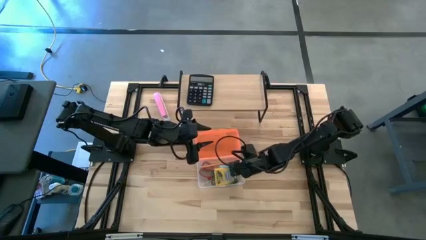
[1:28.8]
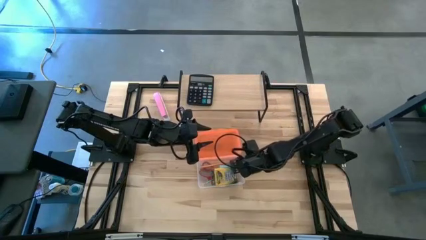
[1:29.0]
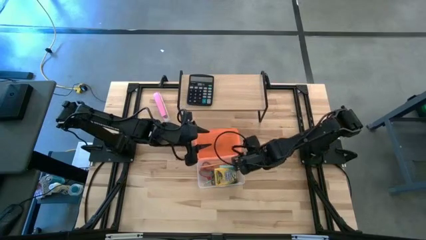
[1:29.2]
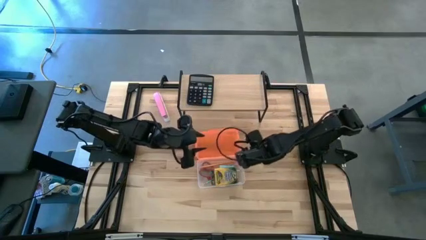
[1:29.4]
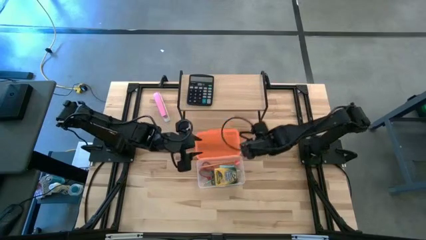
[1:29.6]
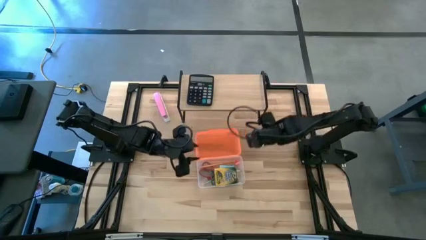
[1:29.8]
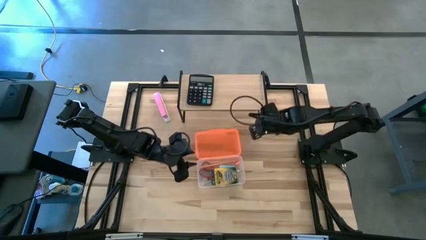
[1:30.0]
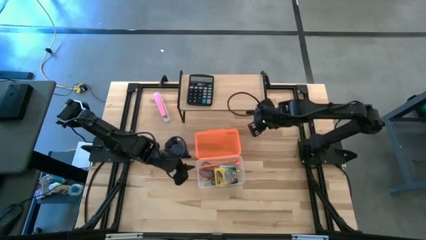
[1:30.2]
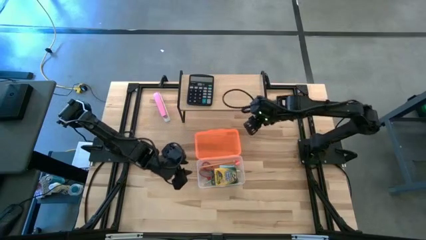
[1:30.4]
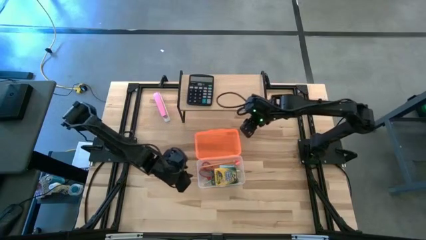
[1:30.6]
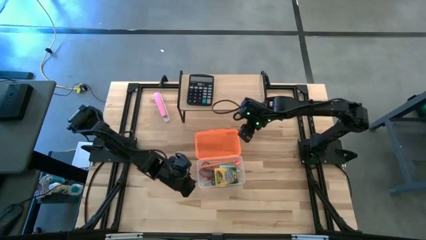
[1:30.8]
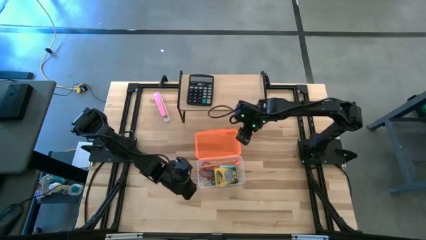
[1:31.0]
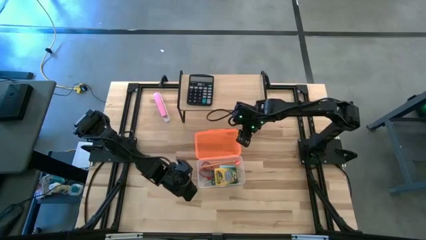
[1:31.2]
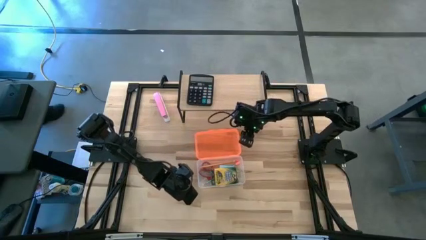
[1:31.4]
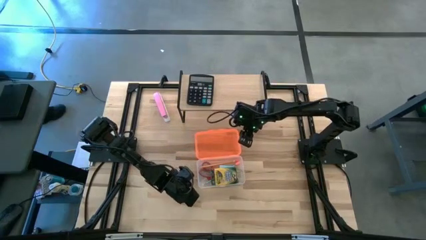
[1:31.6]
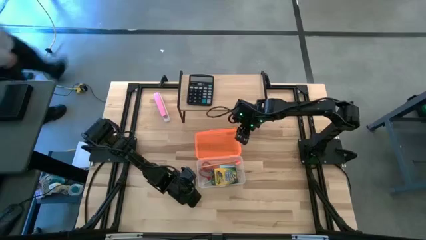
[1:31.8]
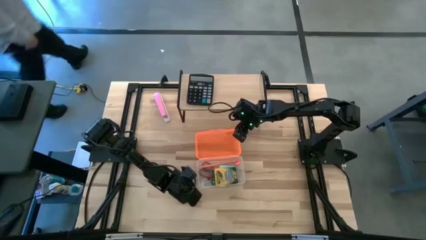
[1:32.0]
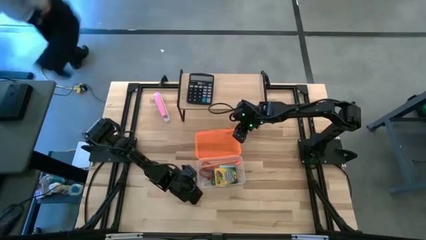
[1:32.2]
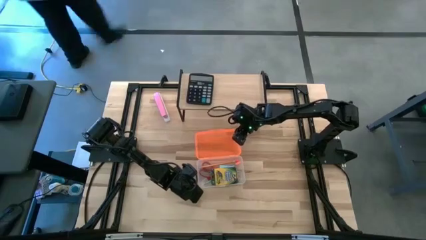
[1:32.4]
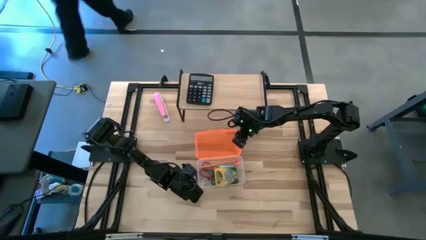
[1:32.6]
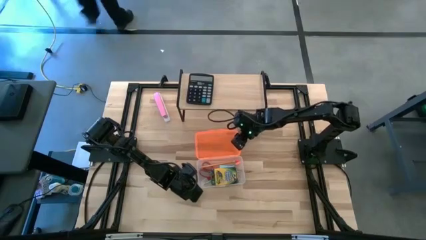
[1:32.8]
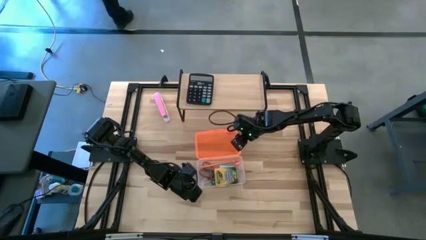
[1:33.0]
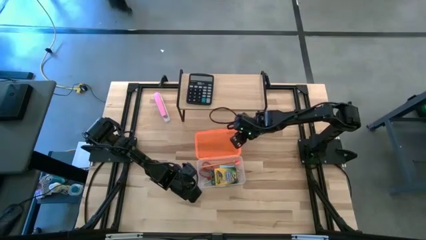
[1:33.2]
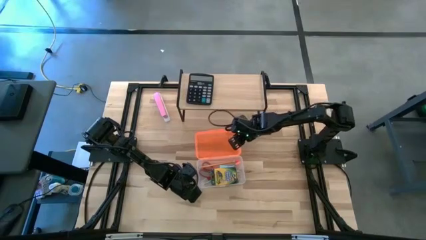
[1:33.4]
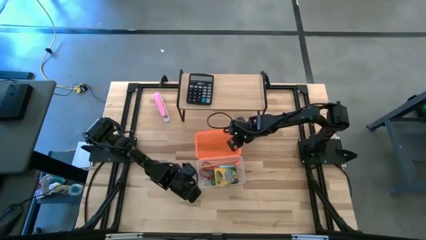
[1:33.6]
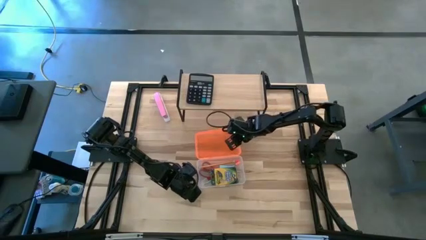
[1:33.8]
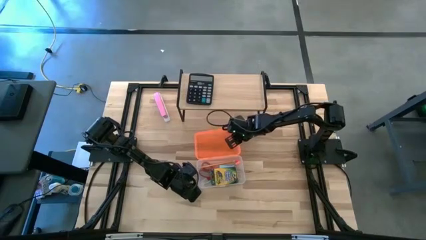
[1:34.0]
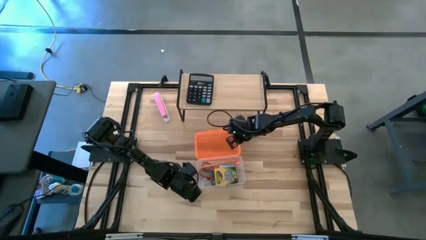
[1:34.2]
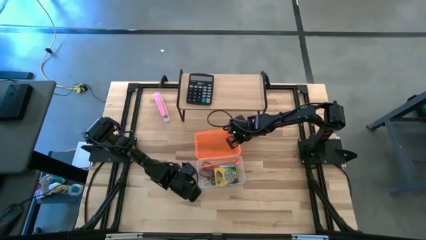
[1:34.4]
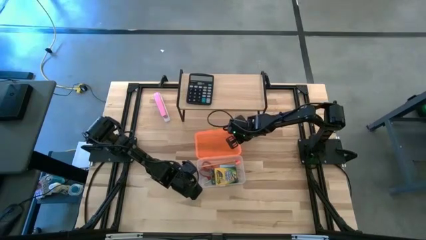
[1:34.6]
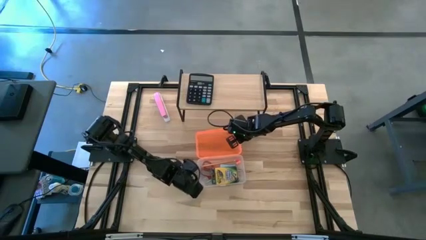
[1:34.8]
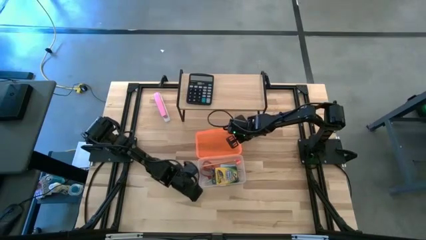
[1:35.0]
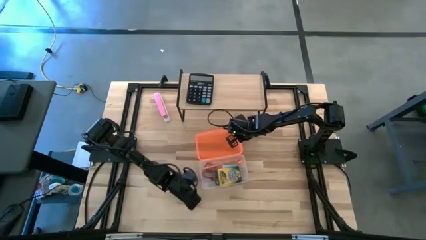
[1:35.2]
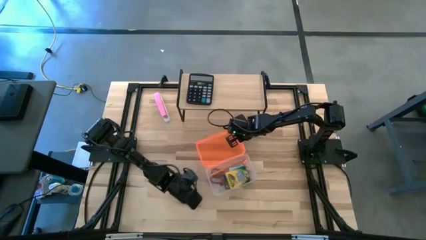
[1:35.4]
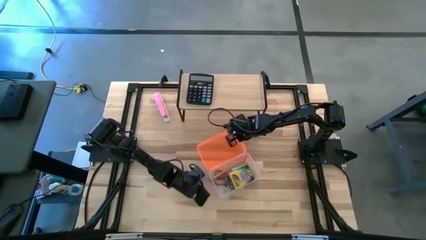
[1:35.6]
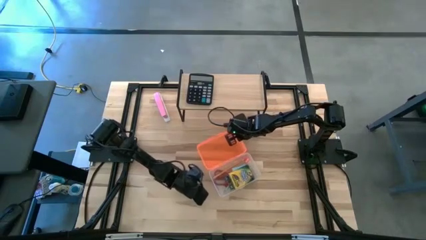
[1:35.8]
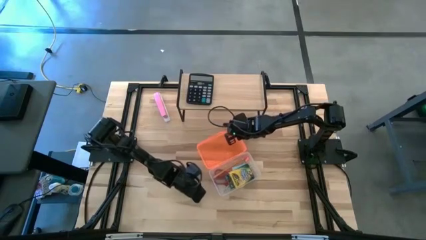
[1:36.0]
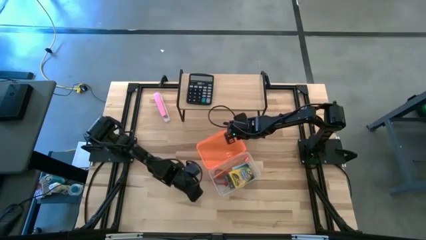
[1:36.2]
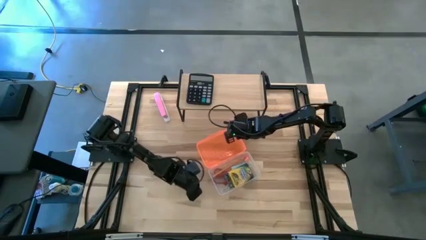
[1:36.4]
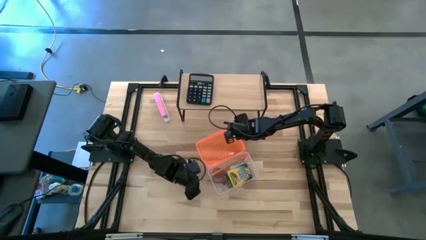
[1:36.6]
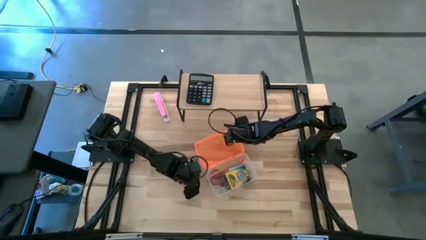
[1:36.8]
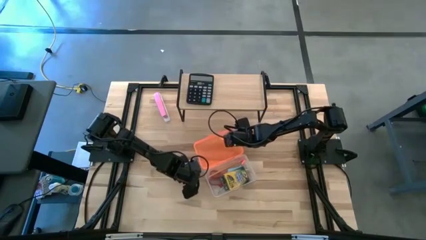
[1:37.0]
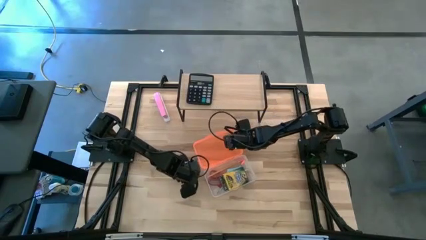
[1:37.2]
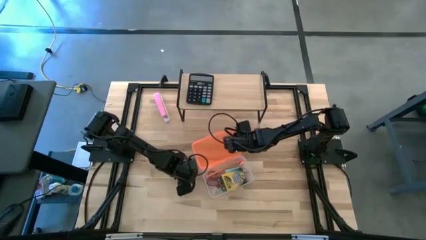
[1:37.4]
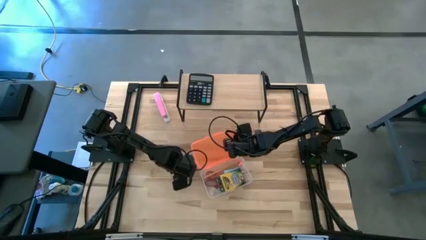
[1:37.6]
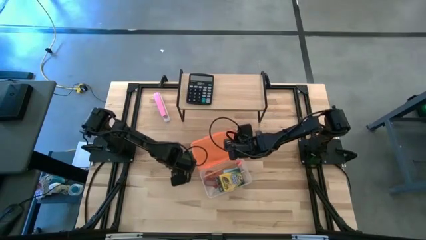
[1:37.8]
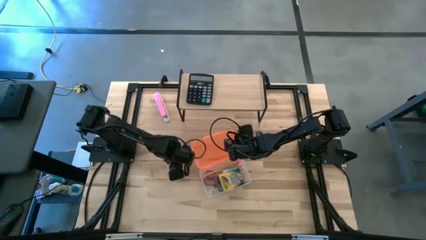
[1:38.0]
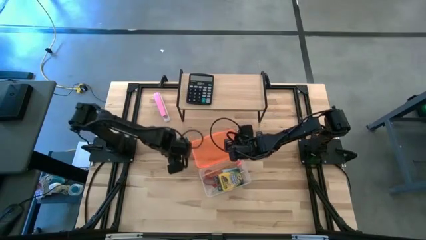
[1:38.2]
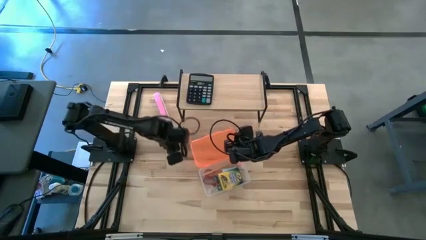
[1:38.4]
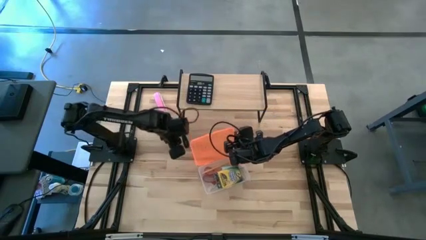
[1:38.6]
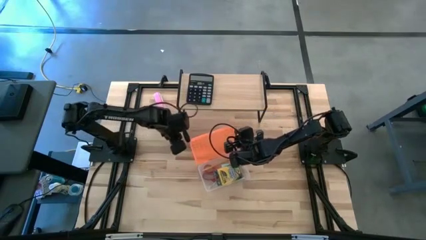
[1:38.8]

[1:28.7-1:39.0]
Task: Pack school essentials
Close the orange supply box

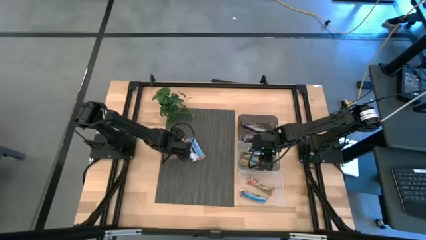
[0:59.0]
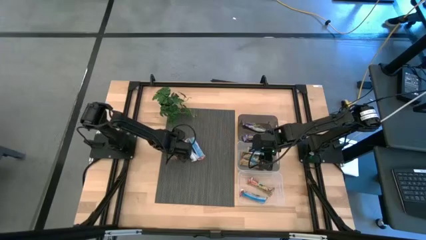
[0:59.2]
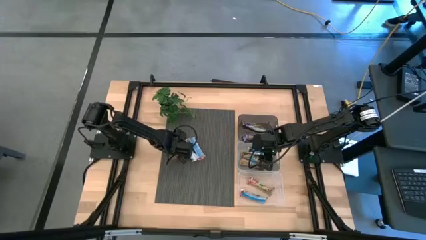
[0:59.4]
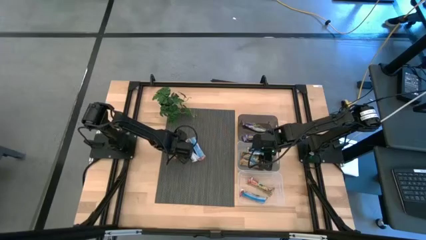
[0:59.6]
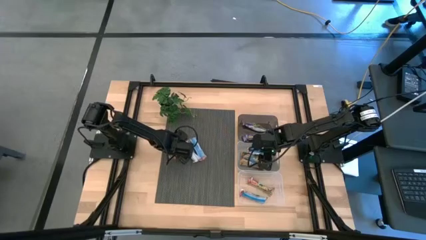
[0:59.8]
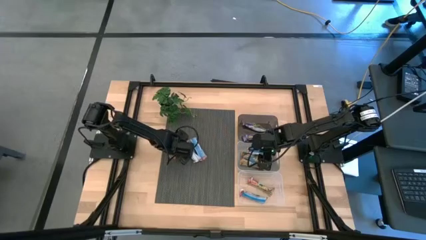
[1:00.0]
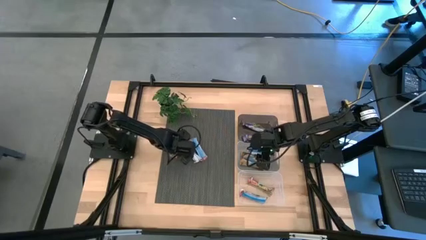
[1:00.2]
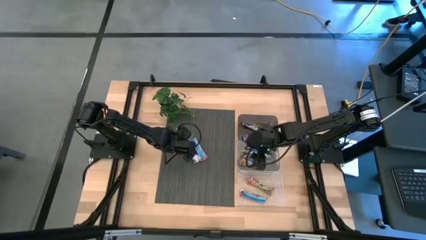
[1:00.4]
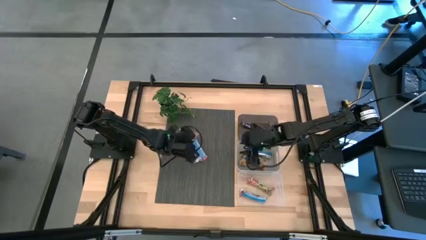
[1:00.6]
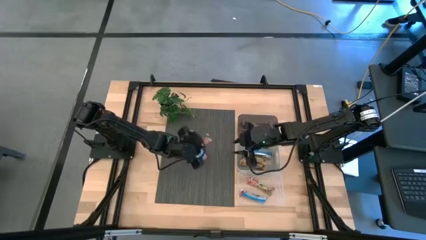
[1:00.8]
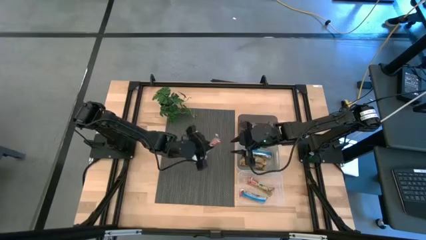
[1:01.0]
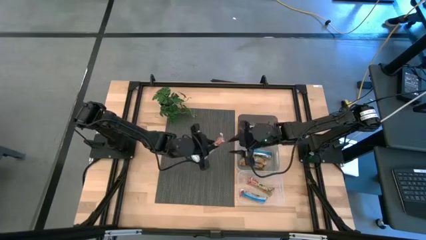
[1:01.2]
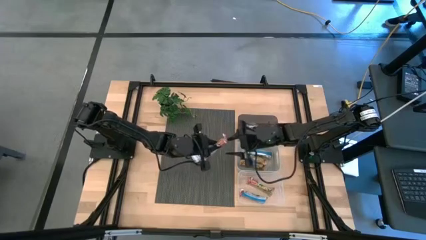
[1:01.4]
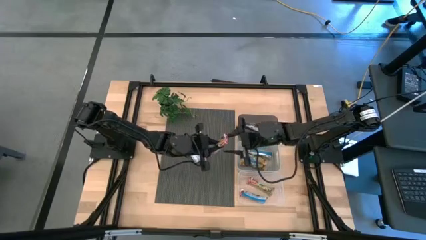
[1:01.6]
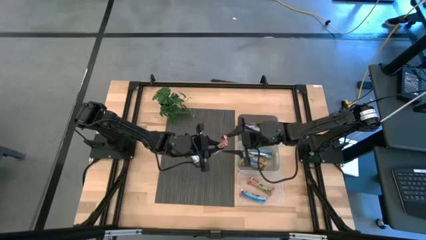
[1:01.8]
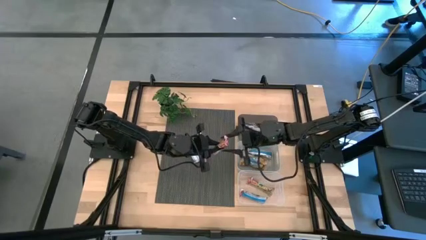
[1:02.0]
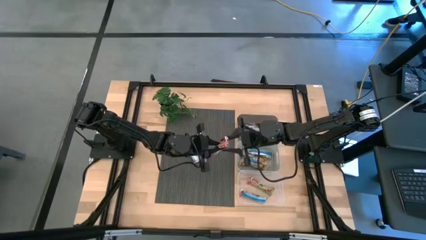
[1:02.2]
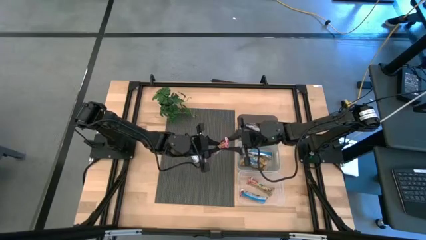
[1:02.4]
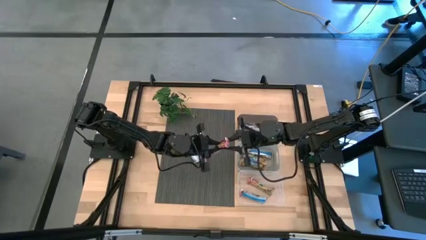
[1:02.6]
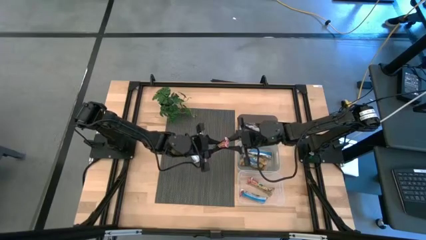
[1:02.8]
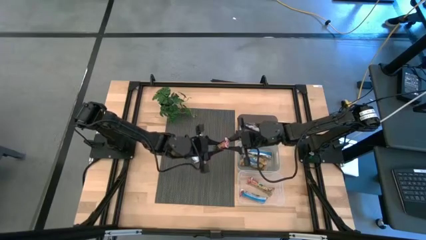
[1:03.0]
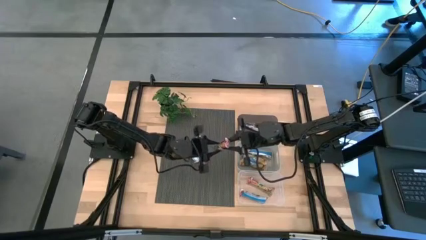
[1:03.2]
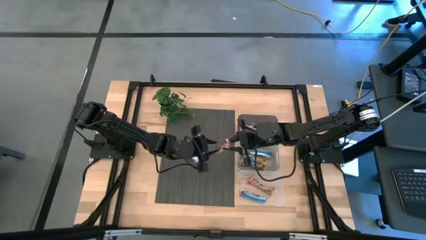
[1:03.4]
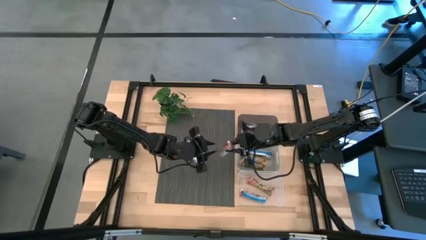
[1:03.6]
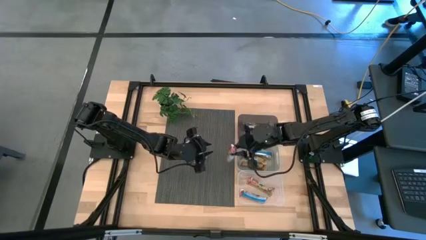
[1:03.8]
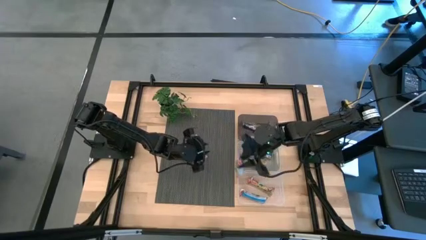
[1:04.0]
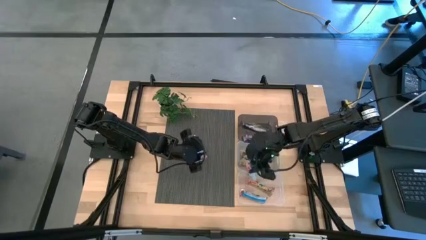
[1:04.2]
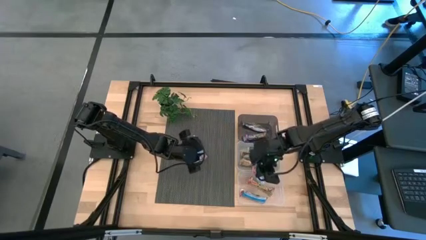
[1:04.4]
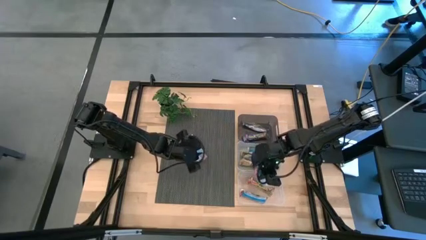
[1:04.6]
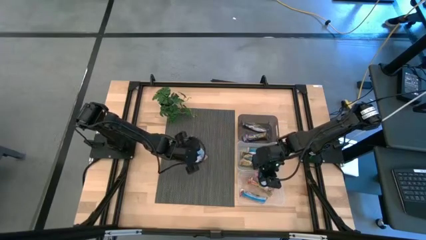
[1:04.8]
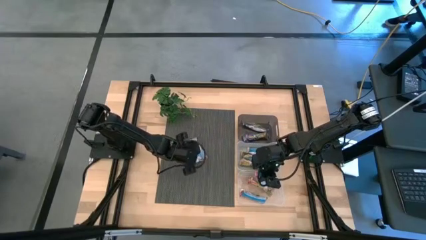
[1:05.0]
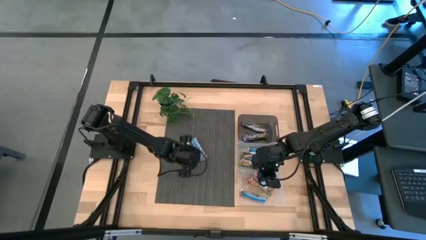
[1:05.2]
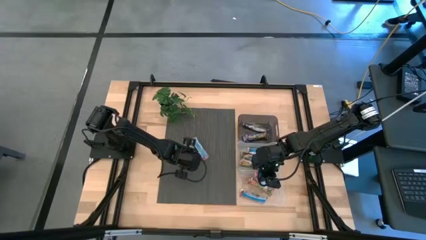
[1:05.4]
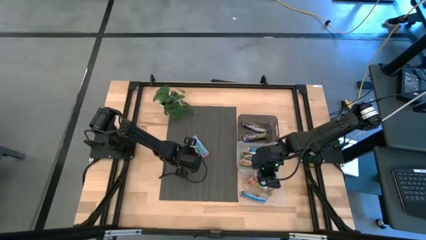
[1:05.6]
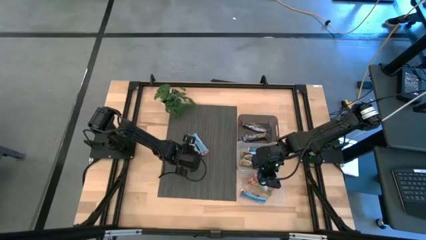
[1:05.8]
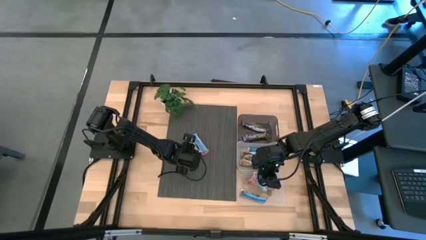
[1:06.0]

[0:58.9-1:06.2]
Task: Pick and place Granola Bars by type
Put the red granola bar into the transparent bin
